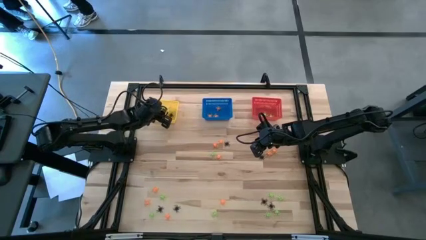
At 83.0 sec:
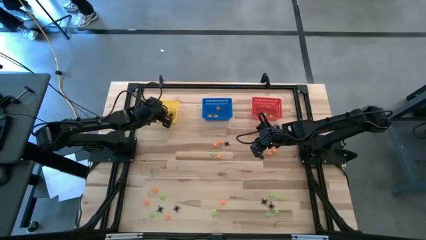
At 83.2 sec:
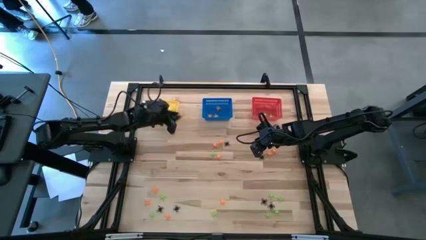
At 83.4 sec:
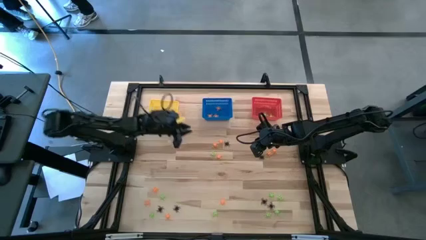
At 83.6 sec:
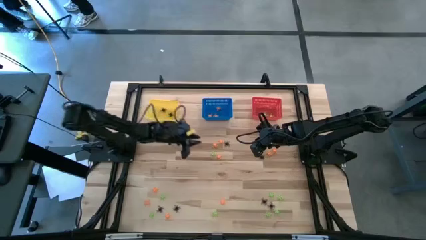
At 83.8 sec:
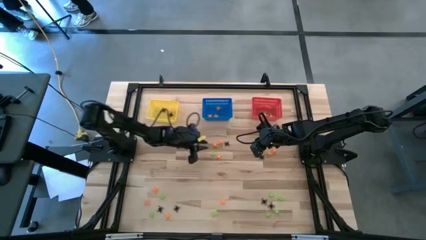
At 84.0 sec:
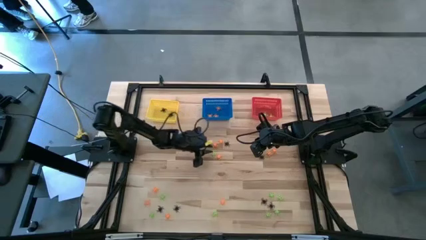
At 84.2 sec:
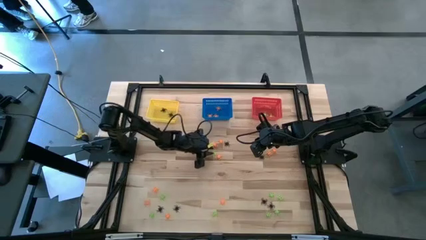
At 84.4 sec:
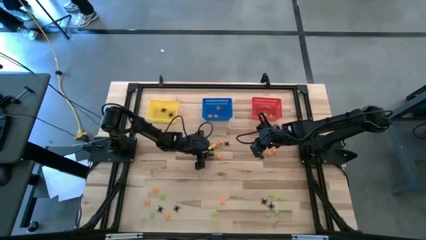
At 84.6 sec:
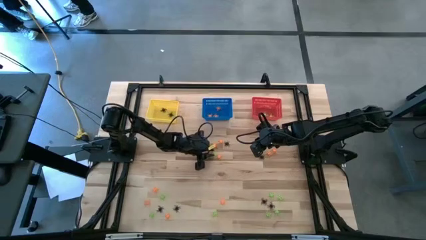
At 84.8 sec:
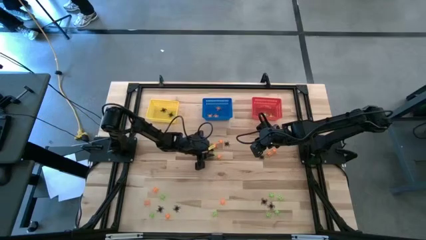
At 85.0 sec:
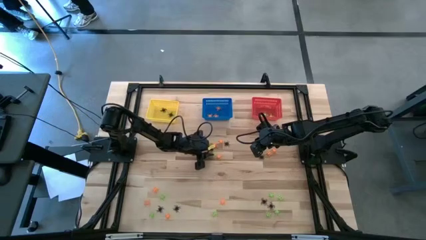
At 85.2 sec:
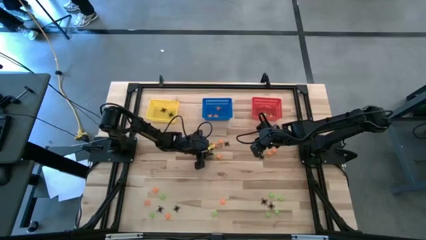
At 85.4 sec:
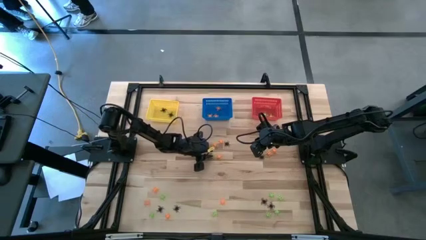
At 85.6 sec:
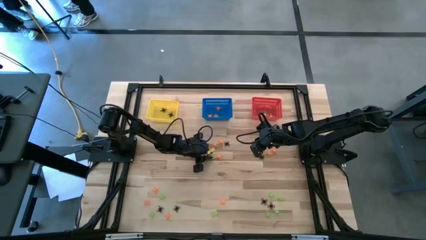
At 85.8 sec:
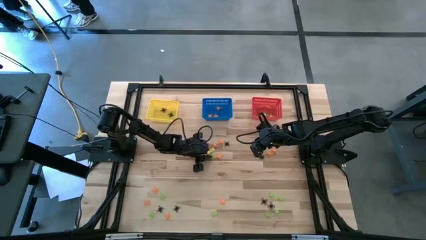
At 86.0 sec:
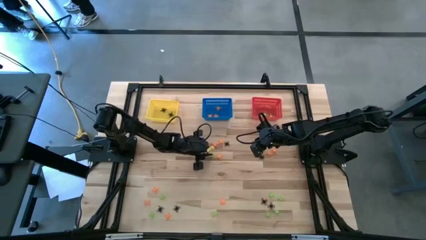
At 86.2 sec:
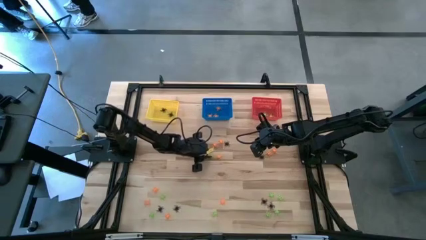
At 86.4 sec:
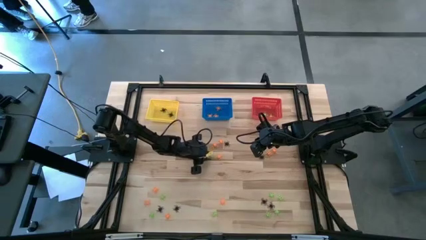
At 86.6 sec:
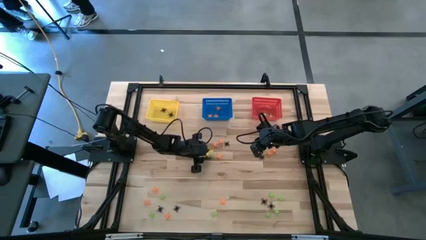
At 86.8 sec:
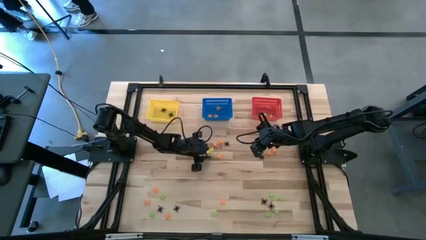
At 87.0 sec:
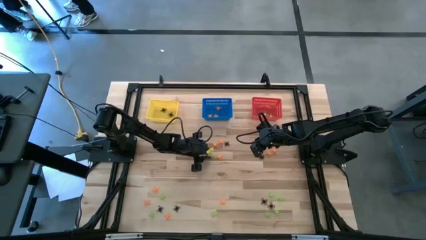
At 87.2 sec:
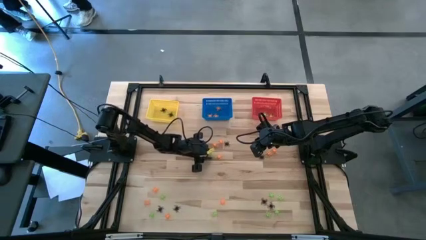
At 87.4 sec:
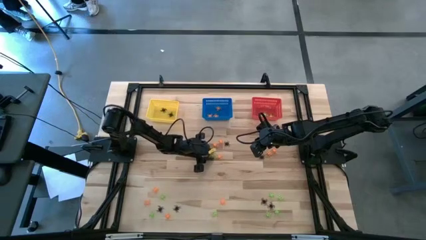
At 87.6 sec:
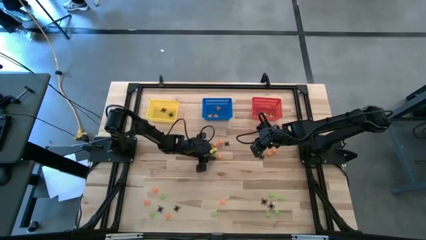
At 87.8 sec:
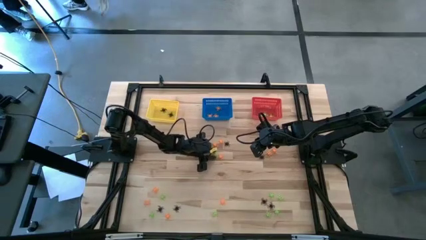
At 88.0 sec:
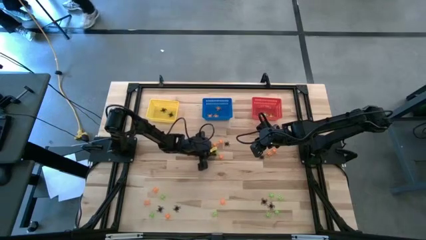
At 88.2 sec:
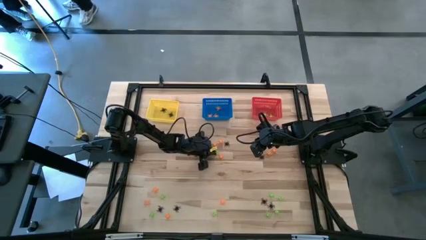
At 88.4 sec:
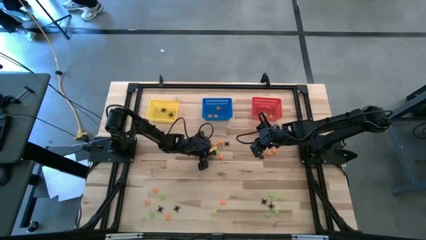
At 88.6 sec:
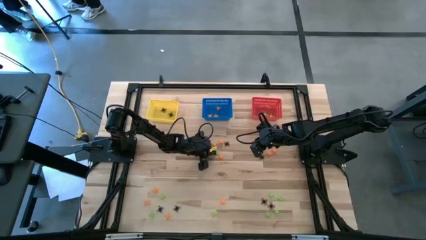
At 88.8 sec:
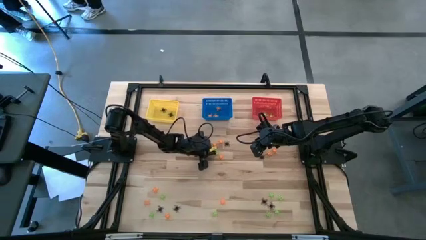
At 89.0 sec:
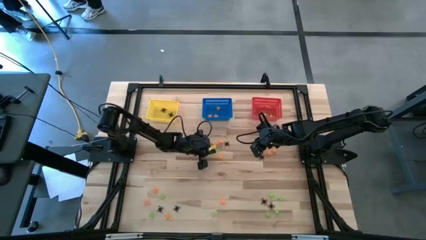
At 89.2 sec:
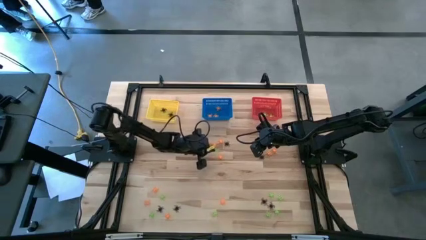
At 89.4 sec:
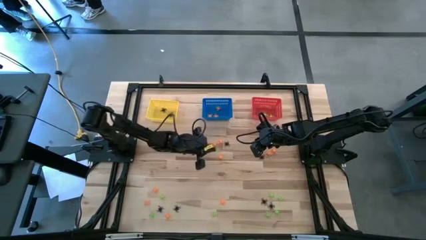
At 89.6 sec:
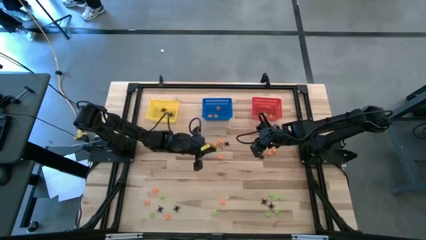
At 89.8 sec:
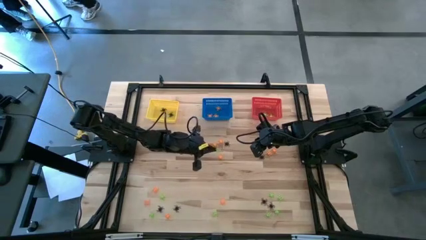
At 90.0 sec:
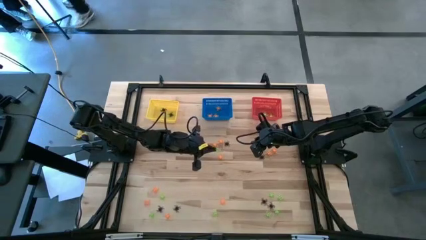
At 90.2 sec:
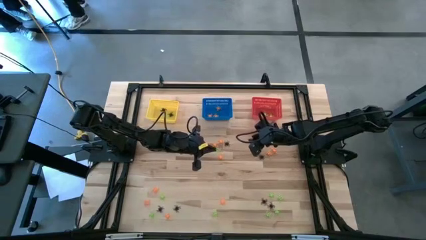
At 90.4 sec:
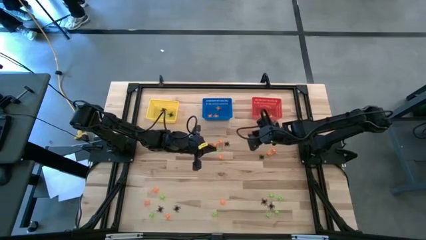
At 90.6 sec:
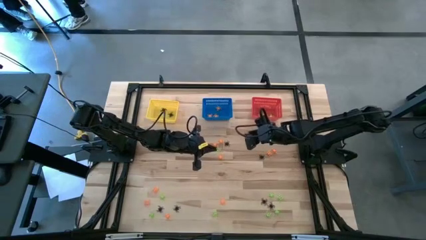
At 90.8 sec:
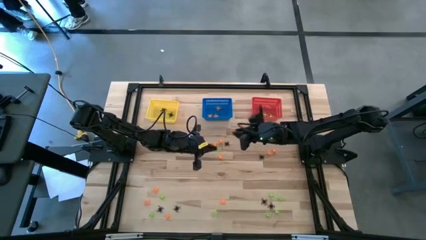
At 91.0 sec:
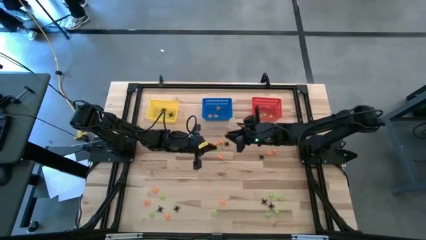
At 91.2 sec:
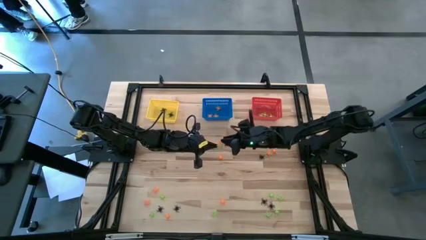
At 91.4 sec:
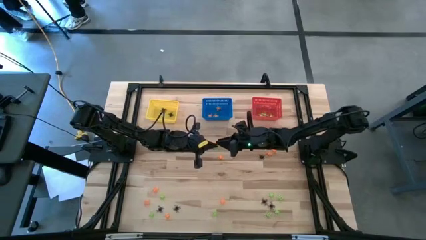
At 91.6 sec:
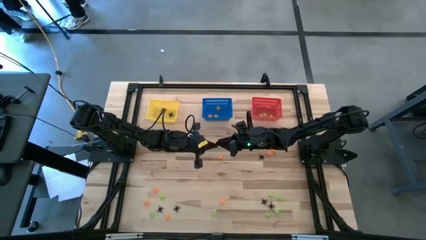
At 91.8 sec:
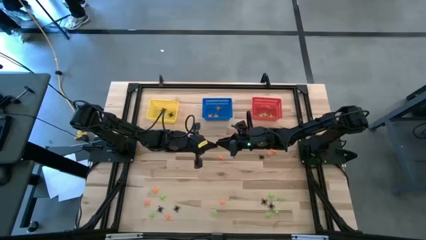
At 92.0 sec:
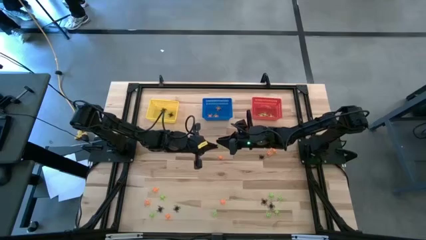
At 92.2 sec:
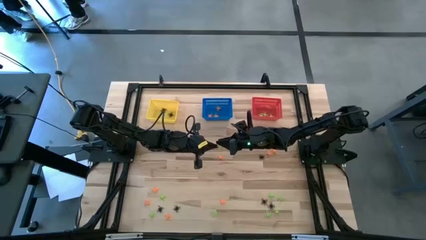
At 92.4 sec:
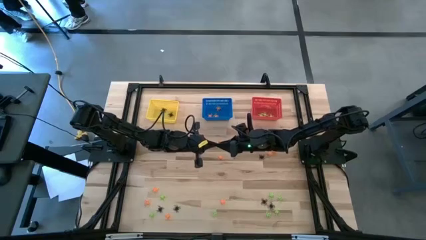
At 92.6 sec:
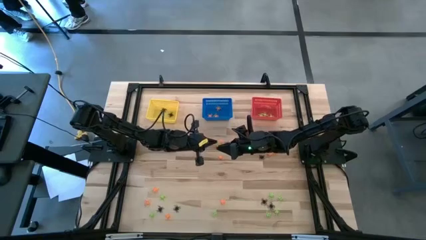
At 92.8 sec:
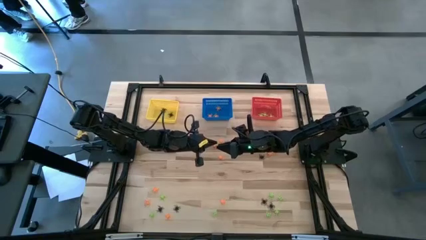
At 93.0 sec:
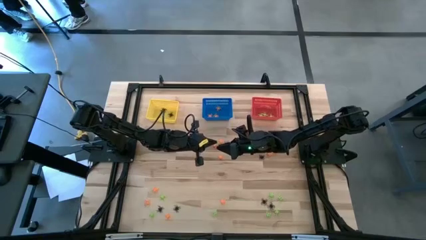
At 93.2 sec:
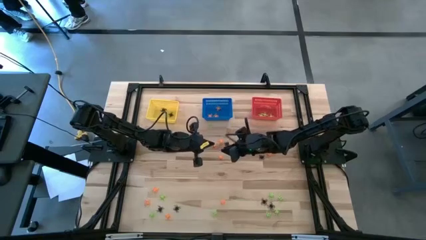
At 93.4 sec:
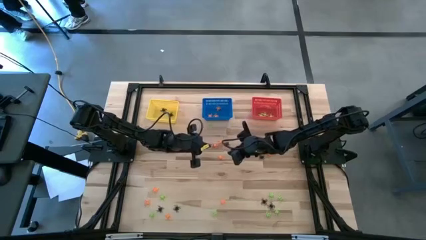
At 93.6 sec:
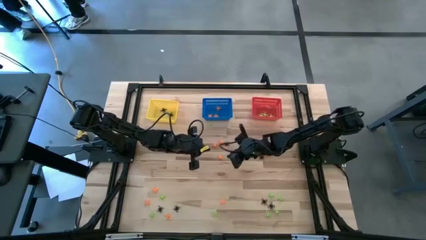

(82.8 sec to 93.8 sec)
Task: Sort Halloween decoration
Put the green spider toy into the red basket

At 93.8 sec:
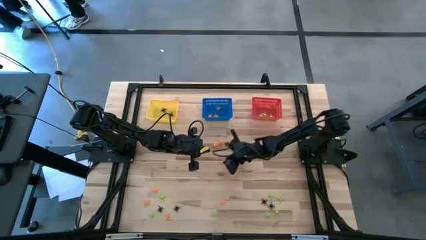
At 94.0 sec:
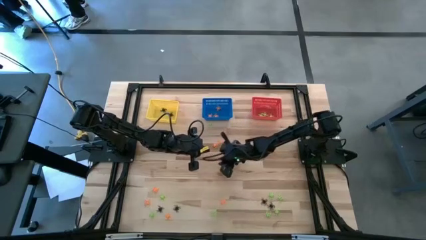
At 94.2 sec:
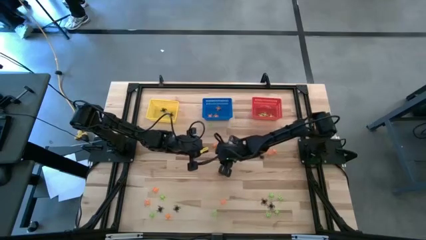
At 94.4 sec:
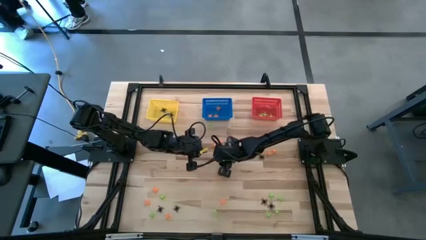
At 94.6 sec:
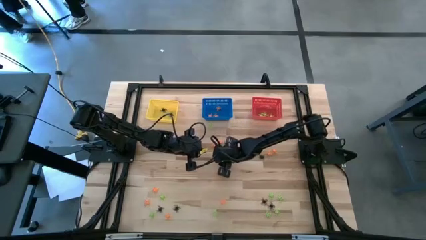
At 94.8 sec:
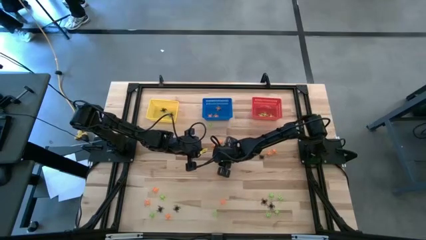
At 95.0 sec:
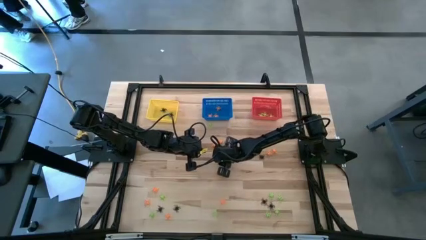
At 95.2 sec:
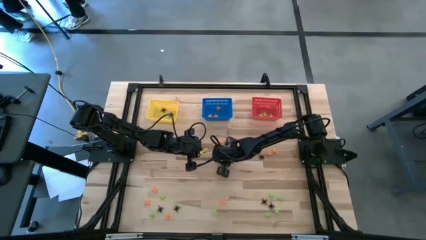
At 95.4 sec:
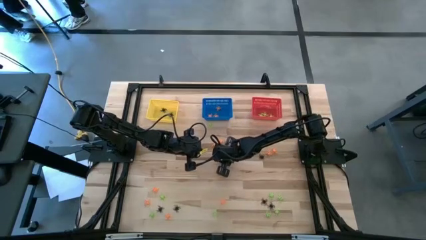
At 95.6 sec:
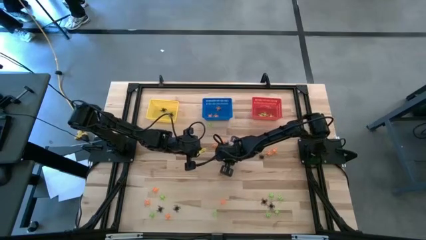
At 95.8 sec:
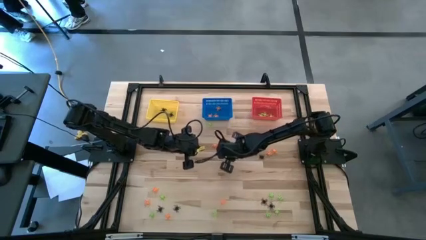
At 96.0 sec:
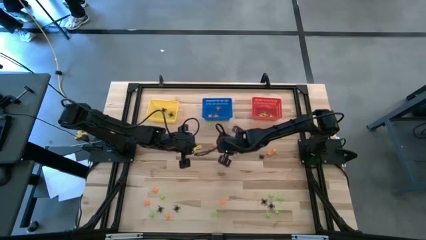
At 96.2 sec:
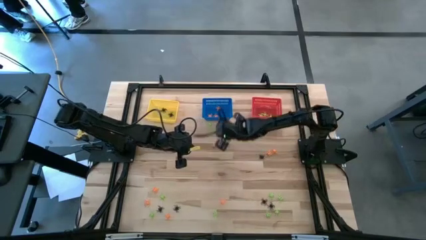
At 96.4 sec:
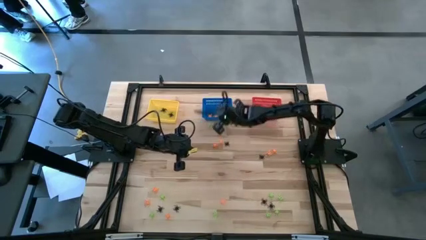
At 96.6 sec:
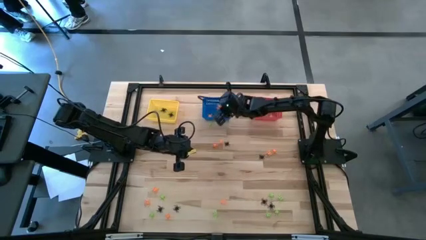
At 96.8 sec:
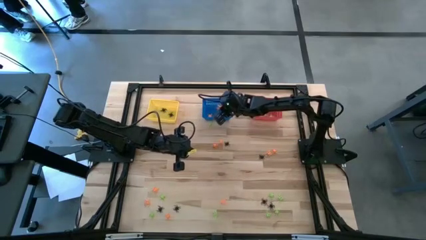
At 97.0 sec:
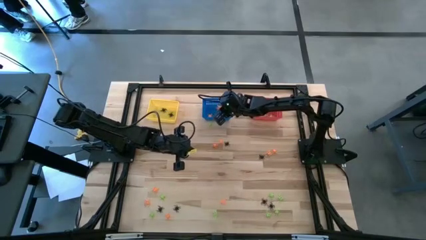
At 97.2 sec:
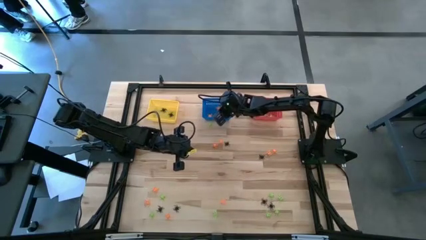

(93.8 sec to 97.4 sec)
Put the orange spider toy into the blue basket
